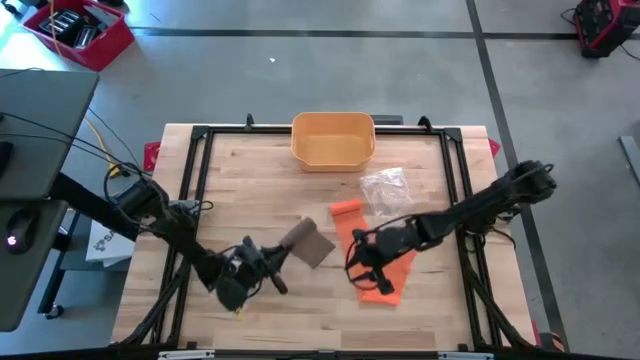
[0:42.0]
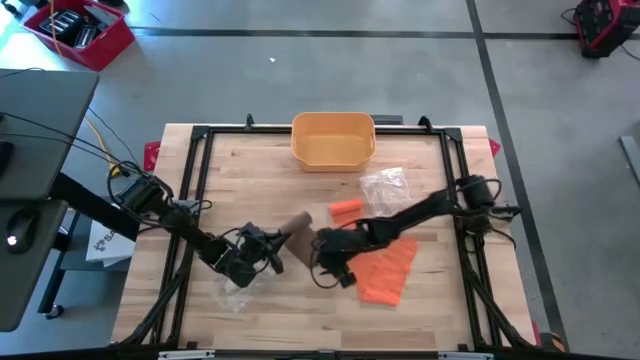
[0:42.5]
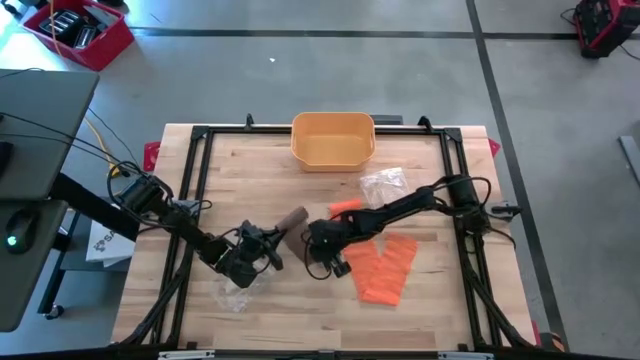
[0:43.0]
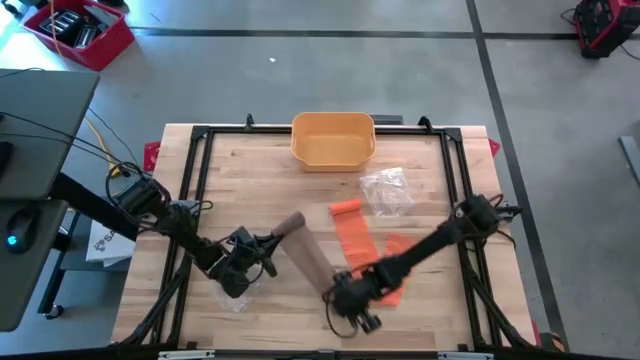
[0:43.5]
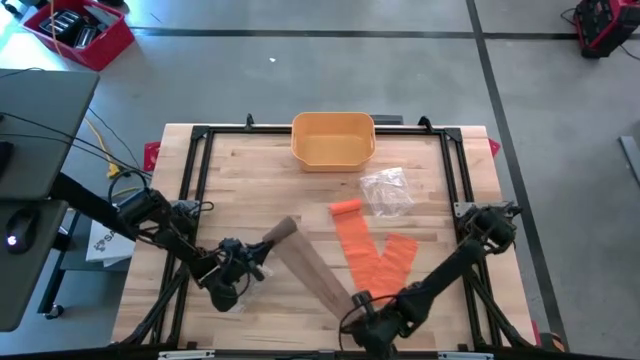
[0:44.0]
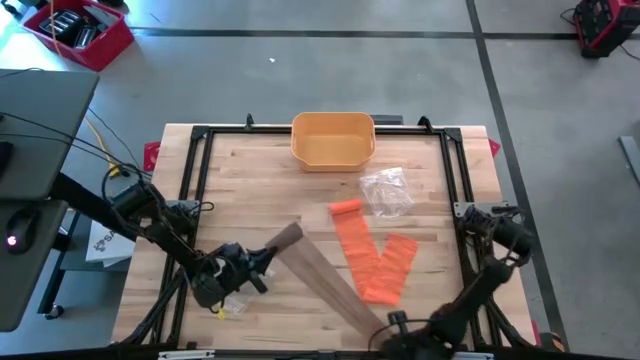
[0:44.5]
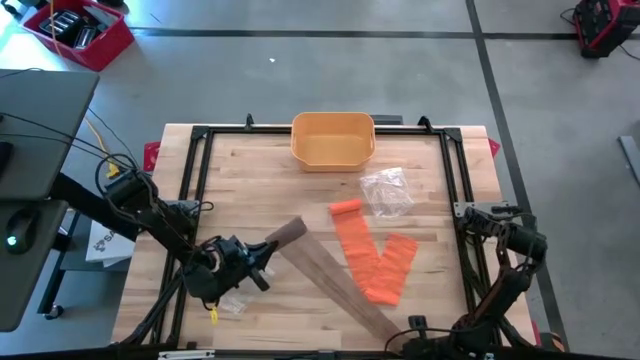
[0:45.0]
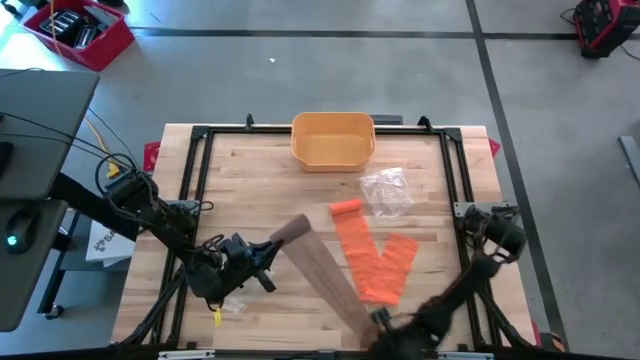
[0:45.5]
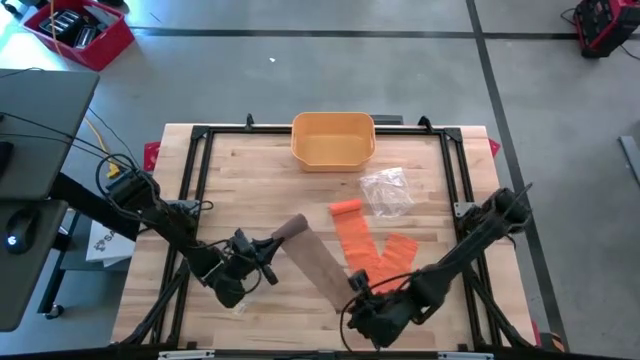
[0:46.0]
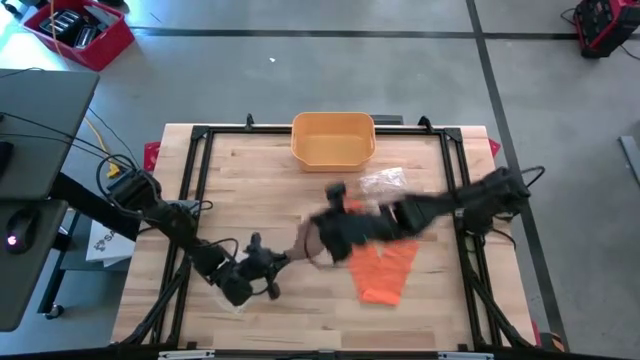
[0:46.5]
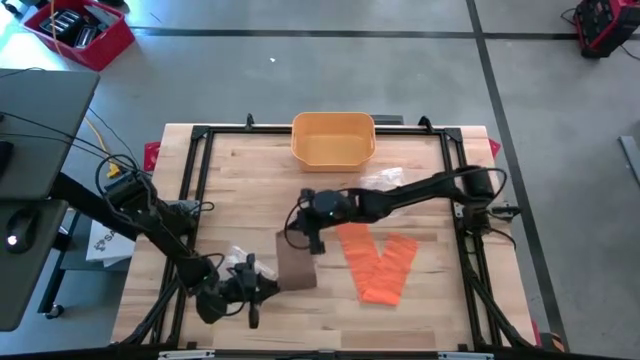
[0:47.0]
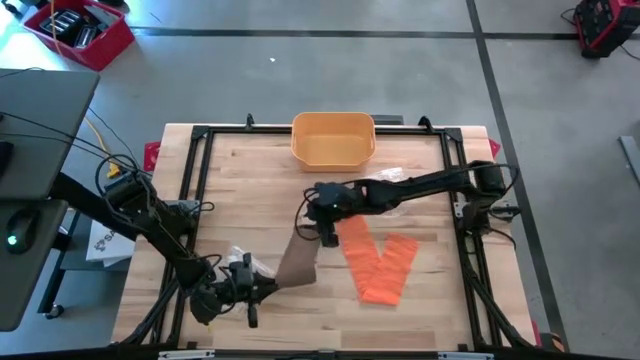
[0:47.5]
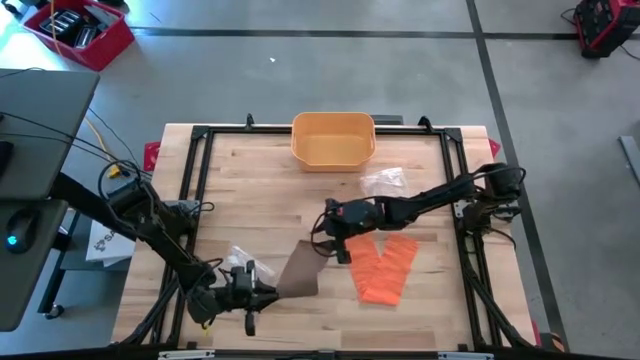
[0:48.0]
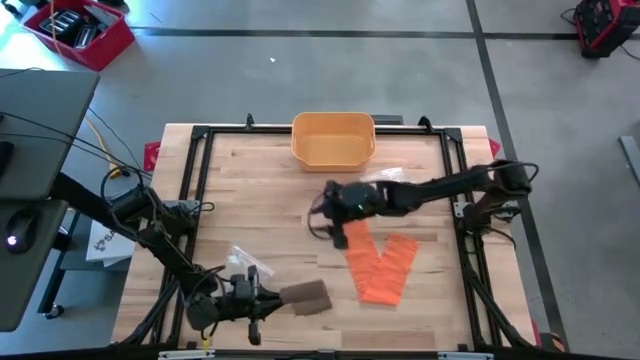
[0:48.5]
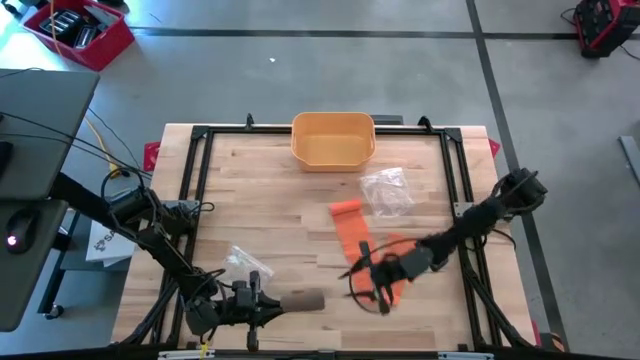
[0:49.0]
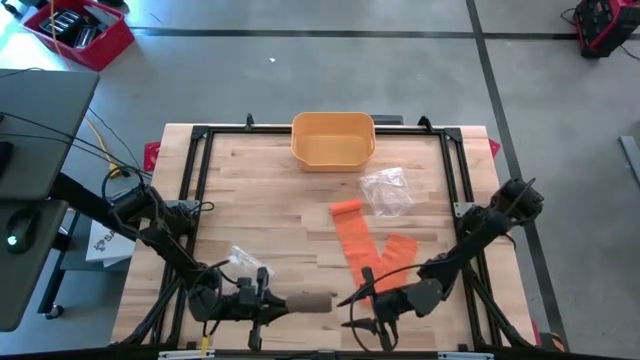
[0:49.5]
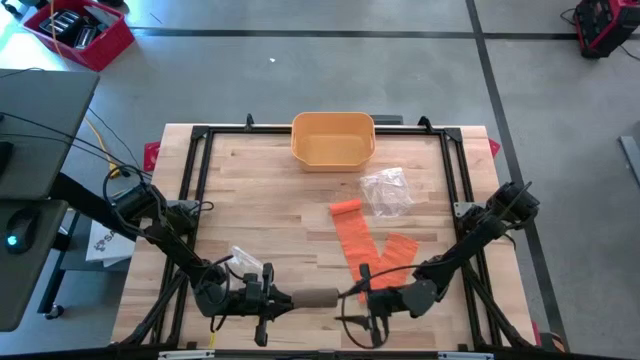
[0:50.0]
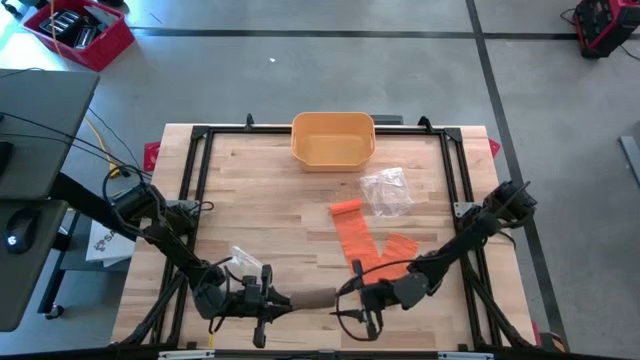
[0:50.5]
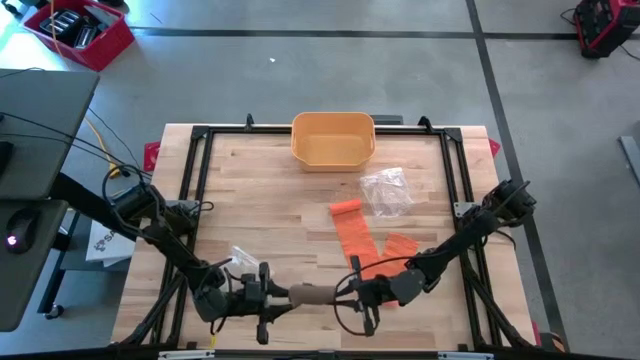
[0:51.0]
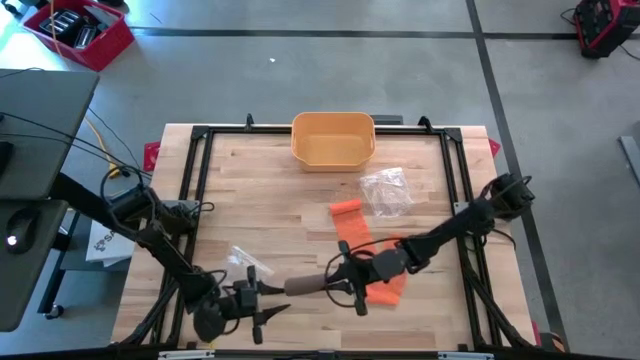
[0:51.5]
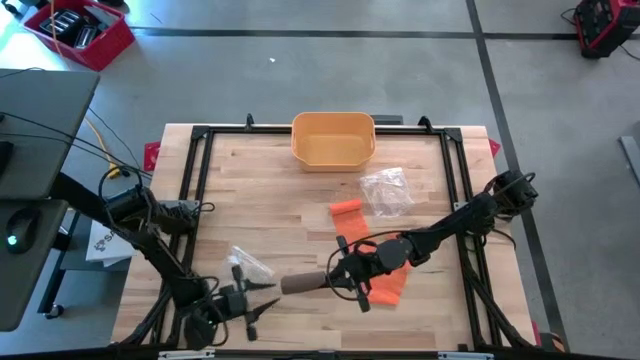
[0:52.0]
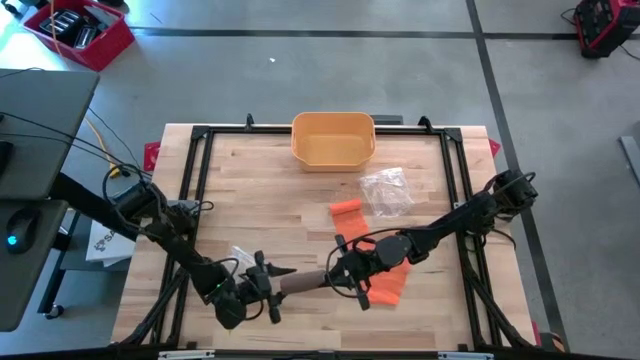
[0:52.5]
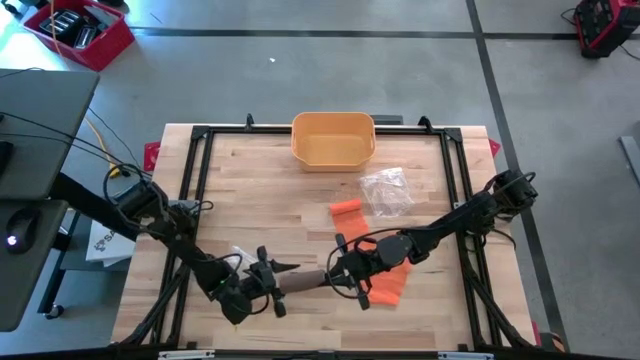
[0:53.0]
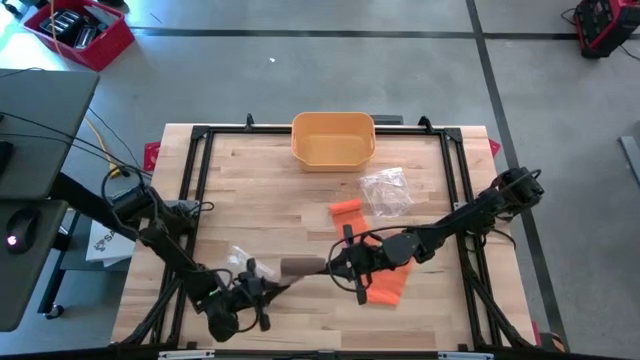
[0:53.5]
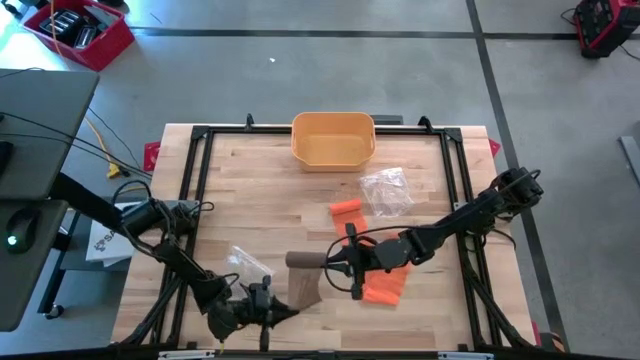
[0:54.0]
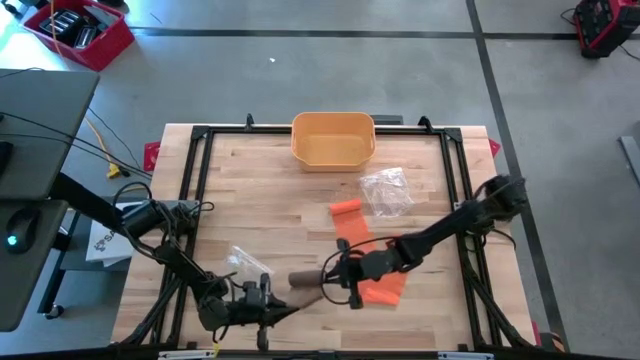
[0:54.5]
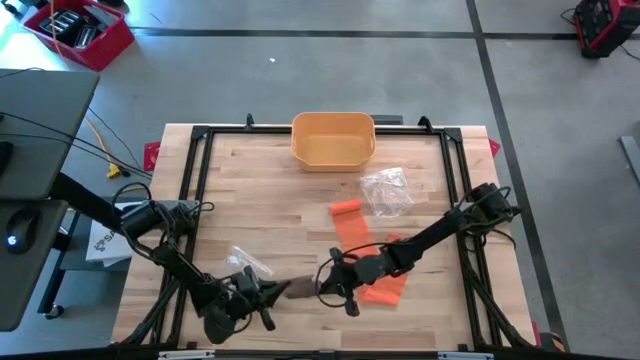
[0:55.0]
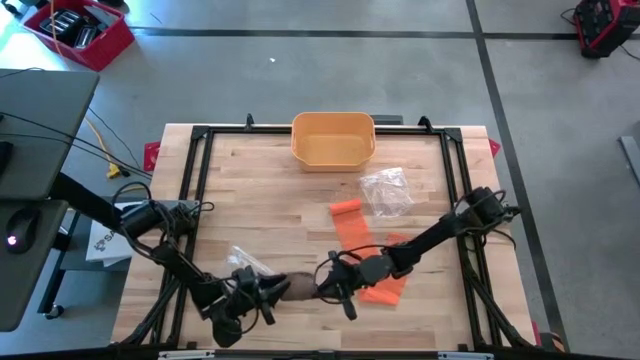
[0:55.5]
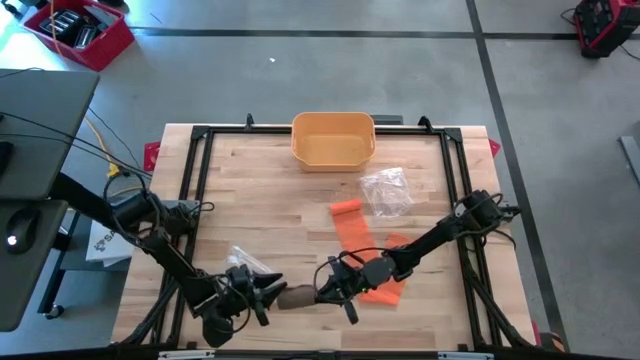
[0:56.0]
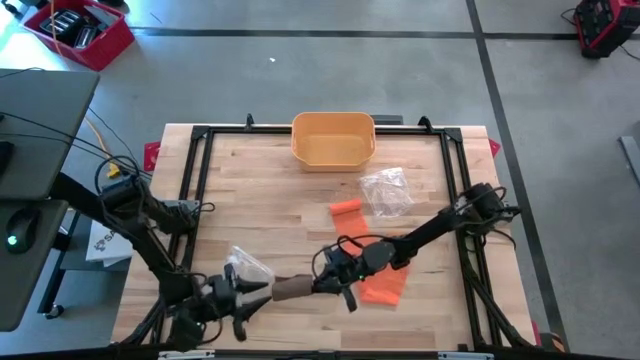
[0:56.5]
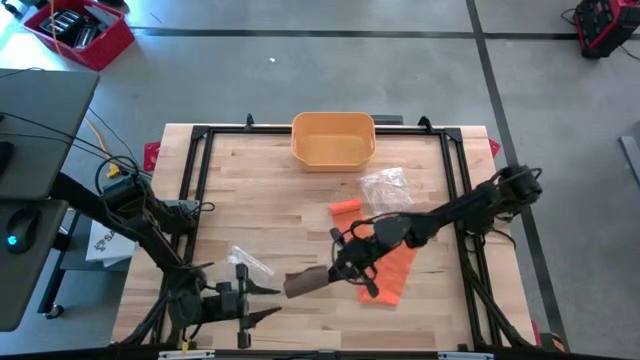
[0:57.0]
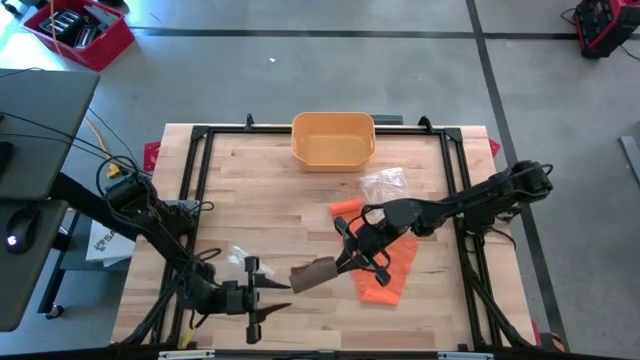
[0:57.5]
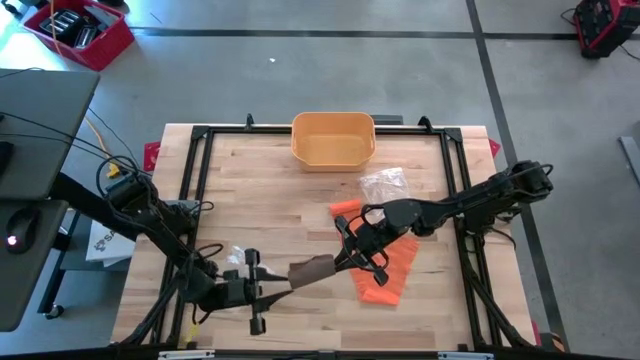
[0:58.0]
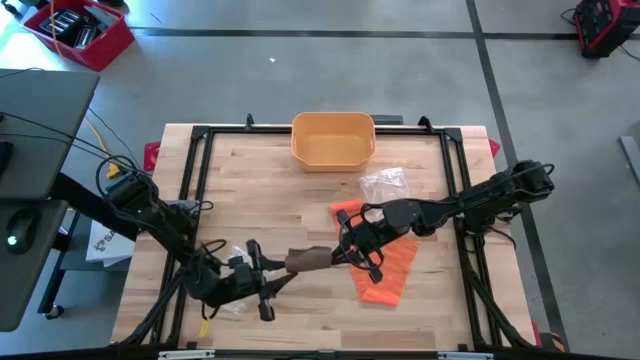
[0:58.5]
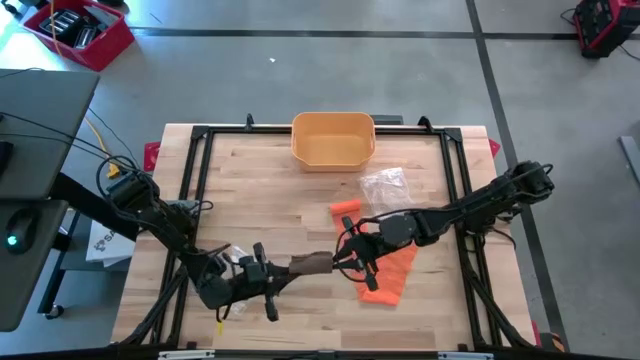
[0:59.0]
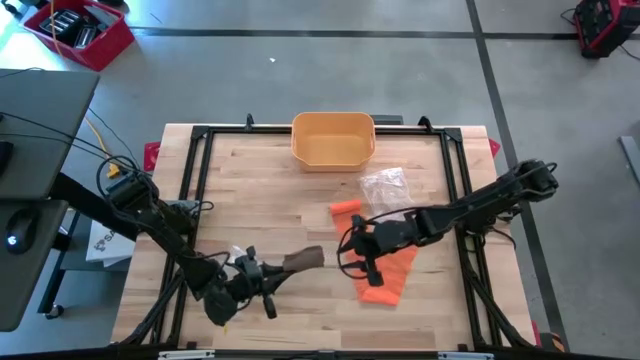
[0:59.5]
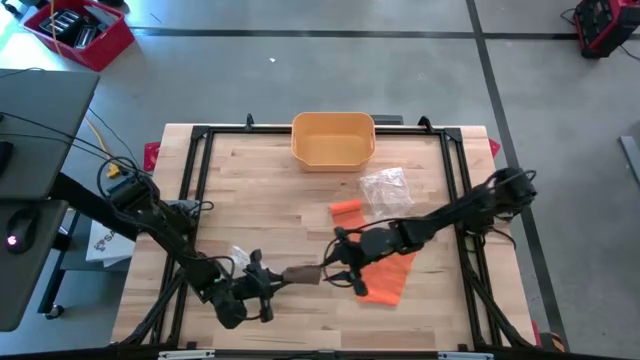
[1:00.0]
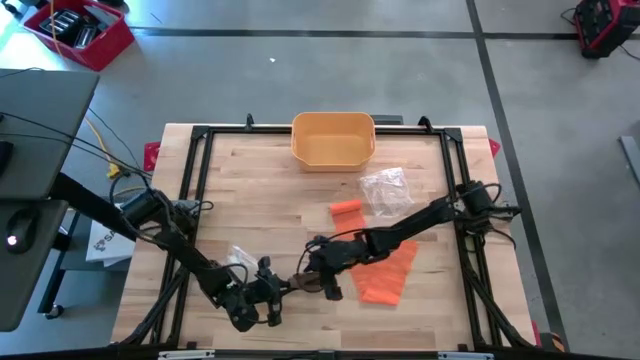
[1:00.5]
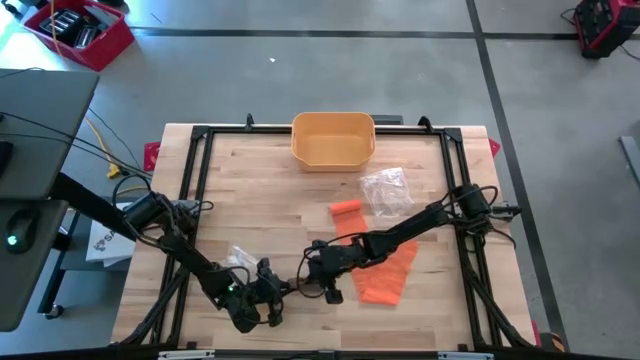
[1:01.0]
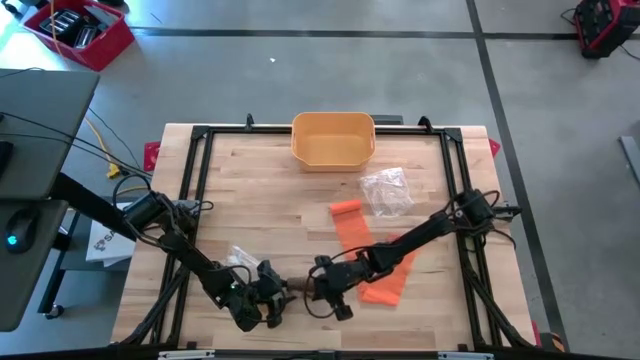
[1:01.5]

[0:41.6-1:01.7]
Task: Roll bandage
Roll the brown bandage

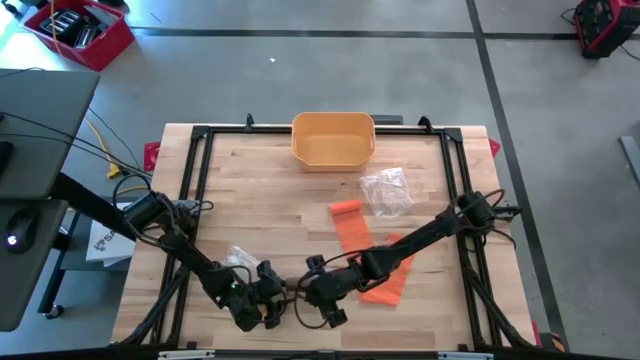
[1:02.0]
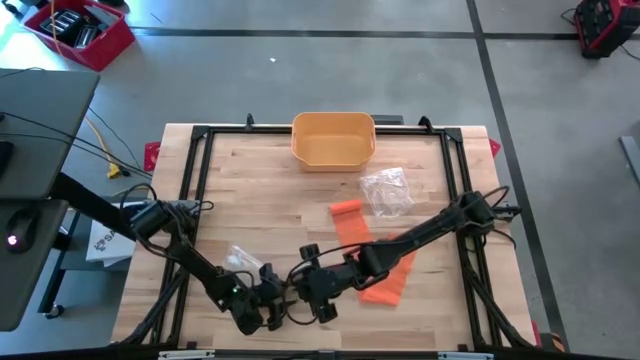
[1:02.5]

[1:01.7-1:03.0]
Roll the brown bandage
